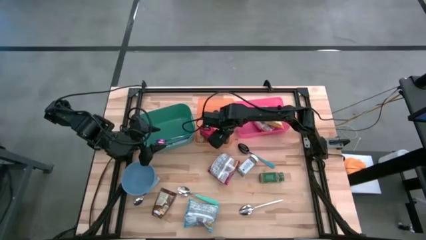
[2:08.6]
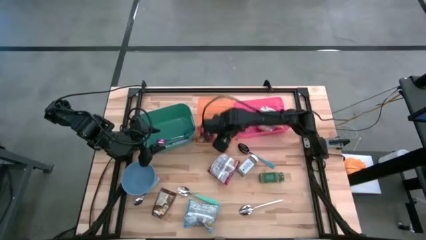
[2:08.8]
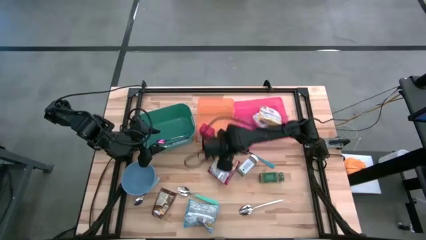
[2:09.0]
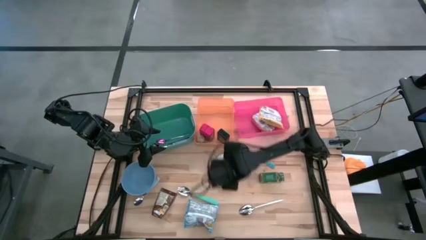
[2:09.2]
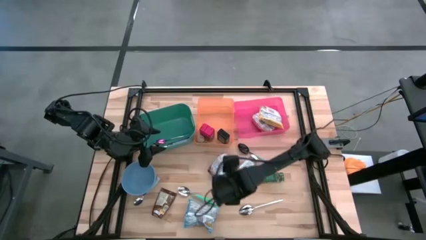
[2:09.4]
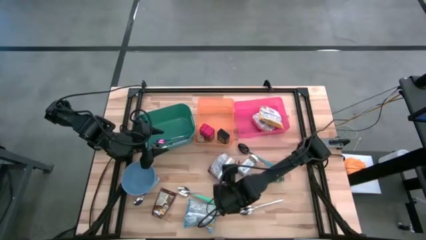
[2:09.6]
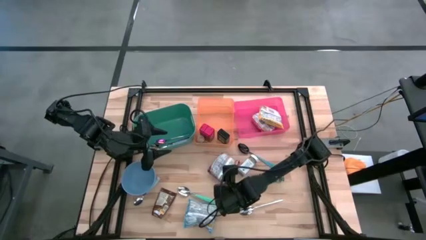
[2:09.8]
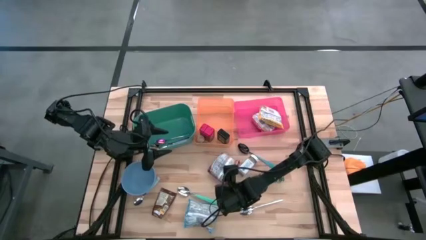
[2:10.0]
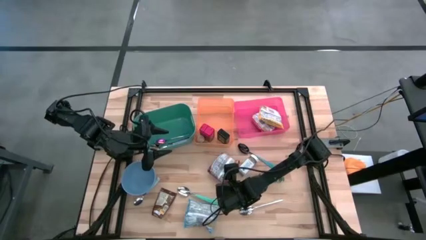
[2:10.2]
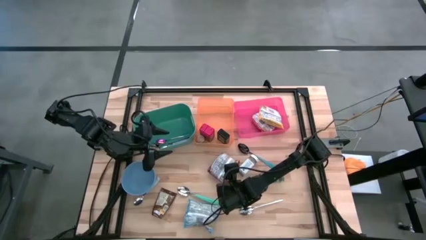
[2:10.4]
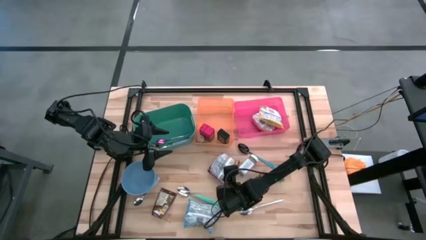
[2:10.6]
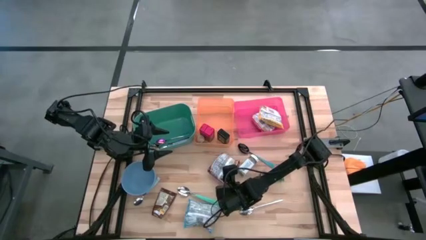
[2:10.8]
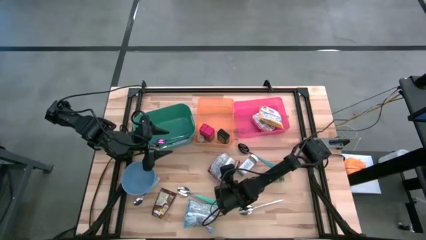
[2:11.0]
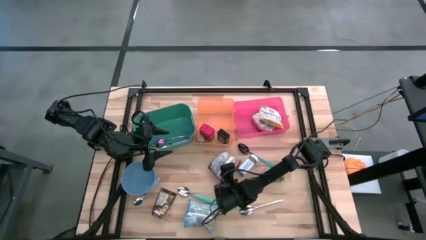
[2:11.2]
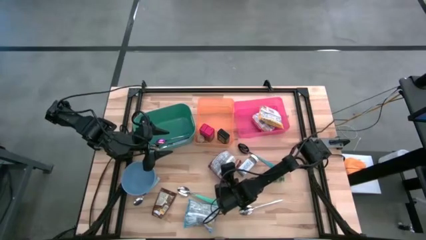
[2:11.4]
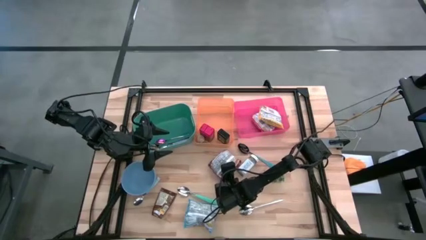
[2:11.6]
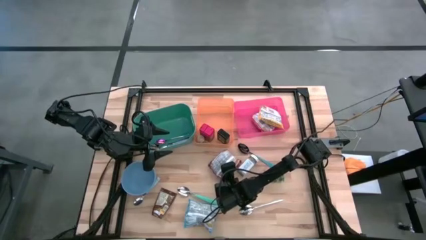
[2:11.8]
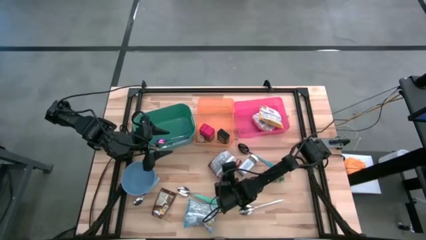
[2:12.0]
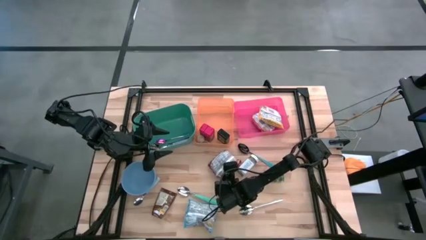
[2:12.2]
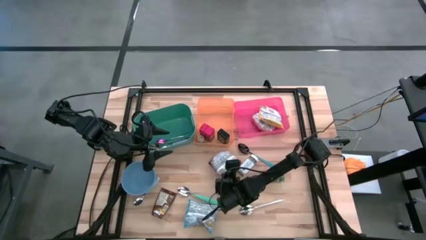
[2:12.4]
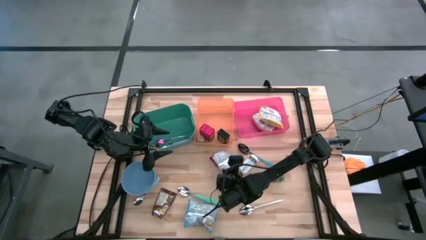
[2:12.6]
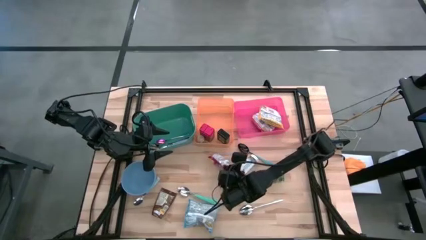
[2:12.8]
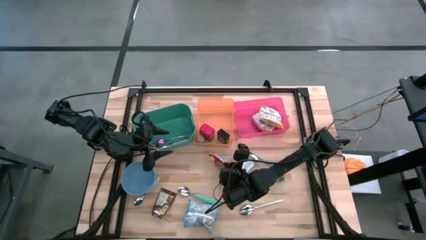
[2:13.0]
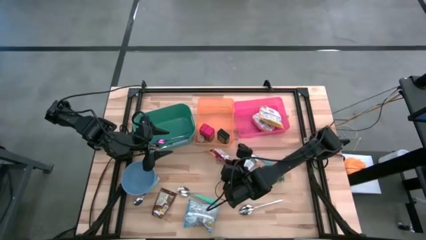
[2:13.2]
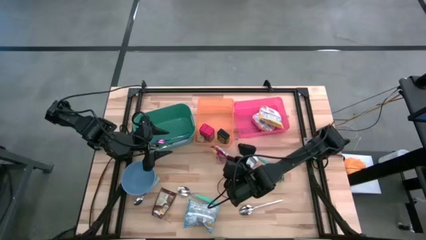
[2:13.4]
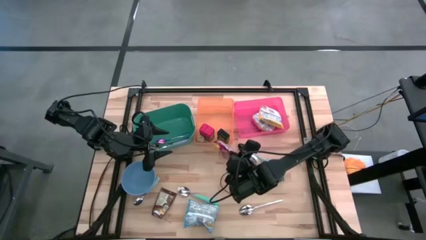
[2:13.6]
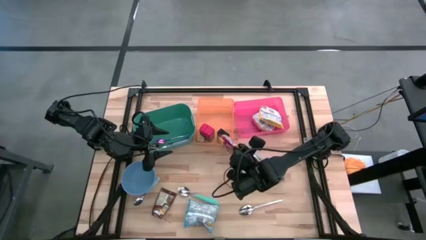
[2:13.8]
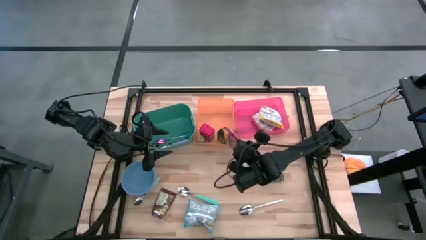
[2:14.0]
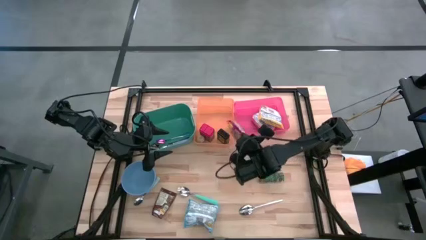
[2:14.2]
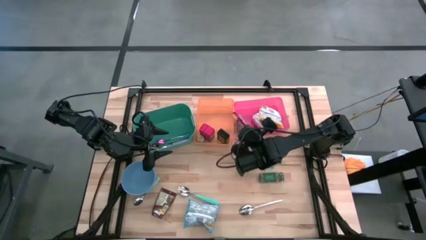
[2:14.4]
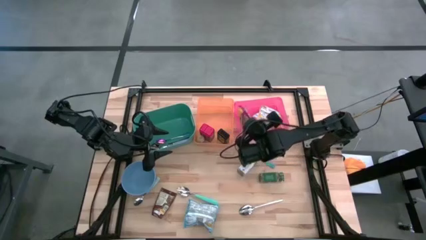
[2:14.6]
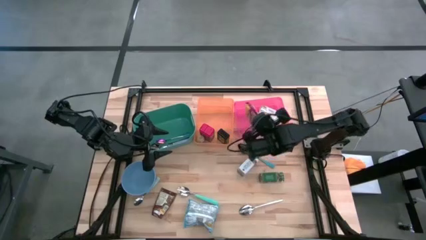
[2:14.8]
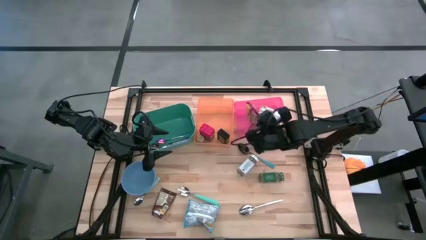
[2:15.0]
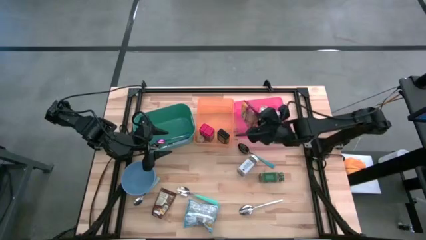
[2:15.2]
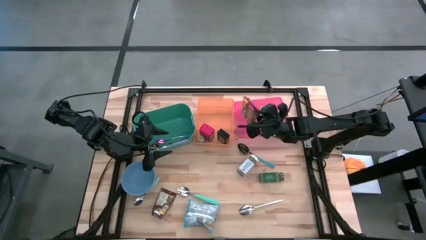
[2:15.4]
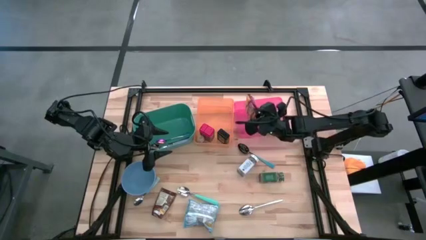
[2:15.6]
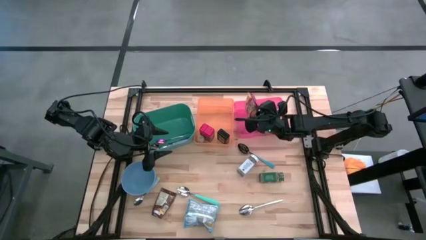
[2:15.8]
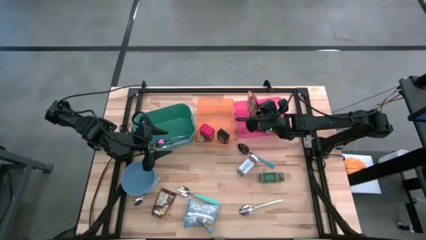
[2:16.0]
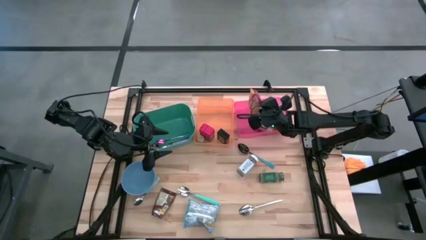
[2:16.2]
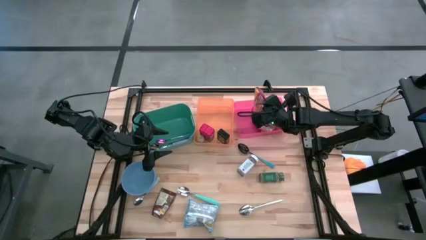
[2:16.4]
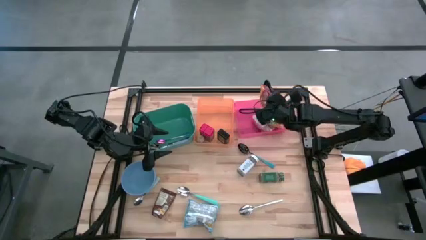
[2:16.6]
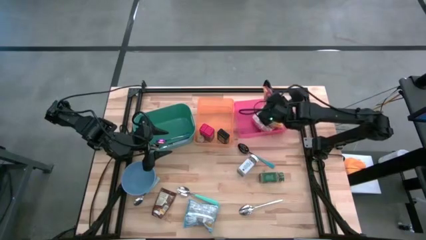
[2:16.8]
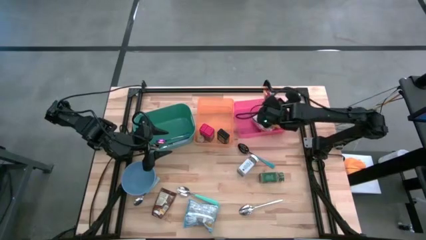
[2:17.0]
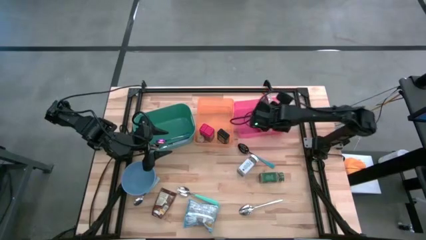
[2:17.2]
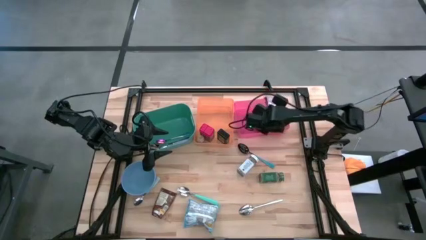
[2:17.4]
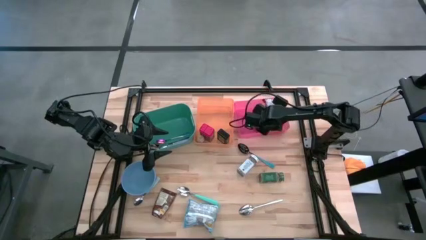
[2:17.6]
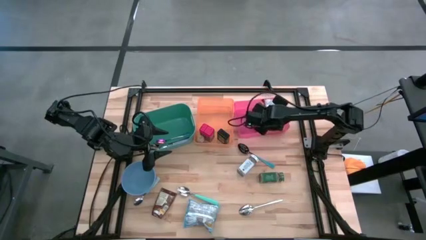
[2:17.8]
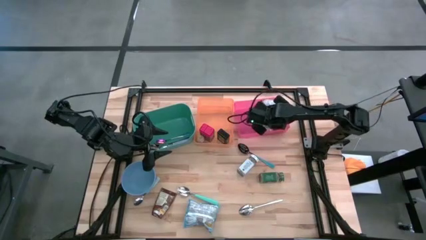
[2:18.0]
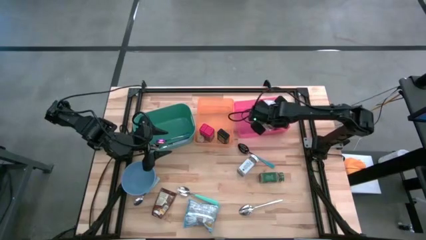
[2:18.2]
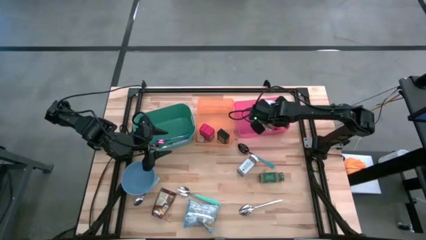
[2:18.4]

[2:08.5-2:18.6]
Put the red noodle pack into the pink bin

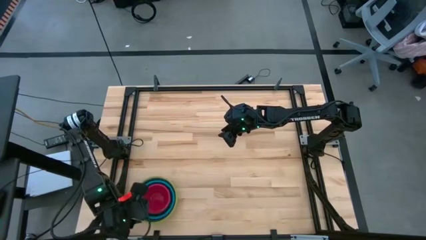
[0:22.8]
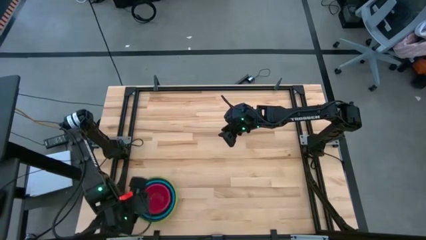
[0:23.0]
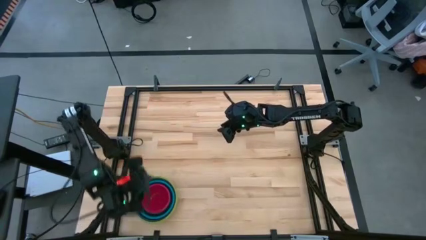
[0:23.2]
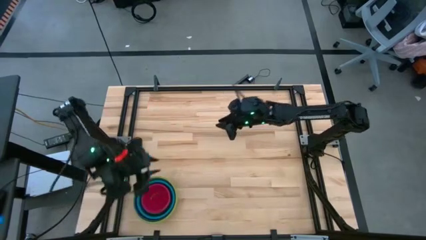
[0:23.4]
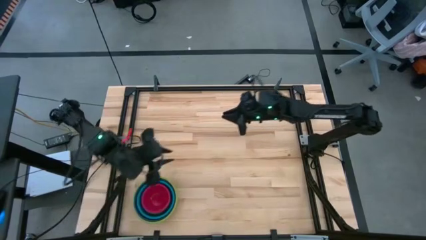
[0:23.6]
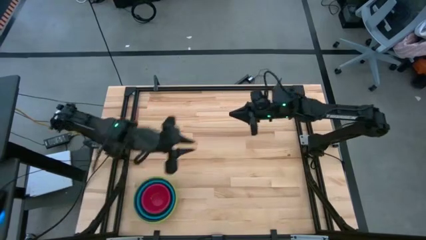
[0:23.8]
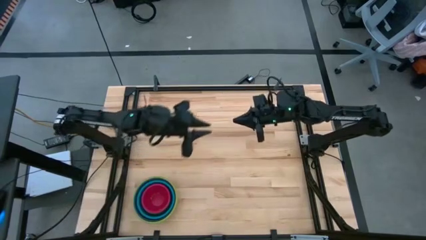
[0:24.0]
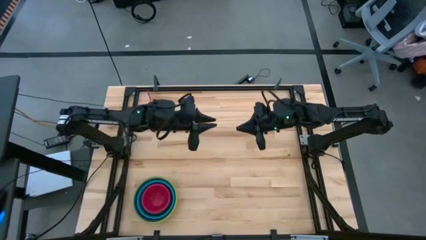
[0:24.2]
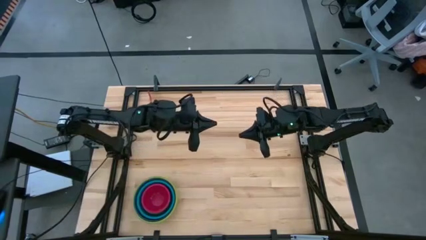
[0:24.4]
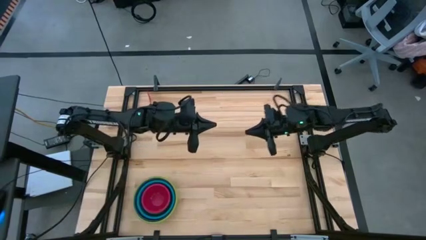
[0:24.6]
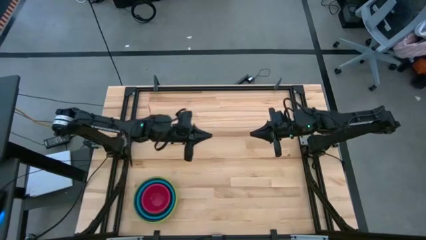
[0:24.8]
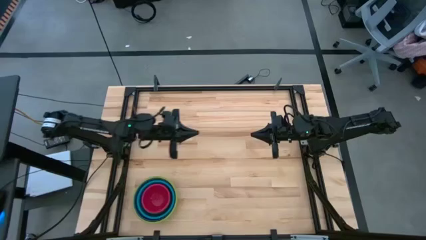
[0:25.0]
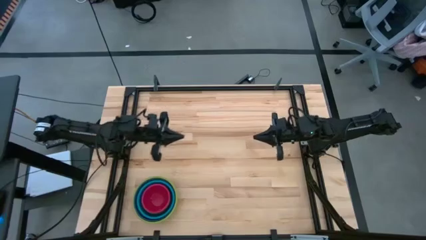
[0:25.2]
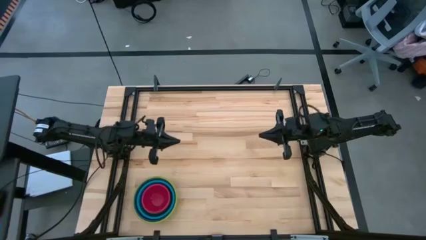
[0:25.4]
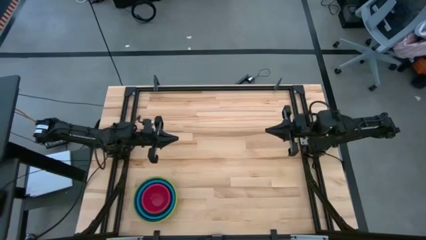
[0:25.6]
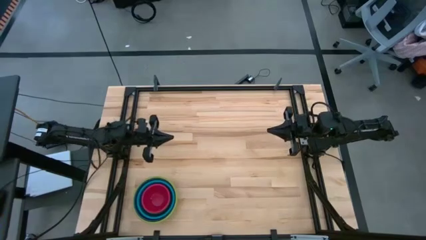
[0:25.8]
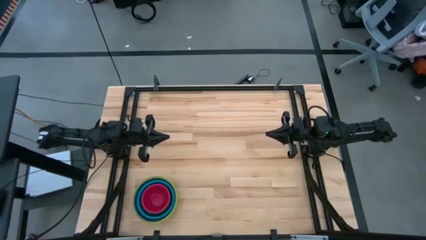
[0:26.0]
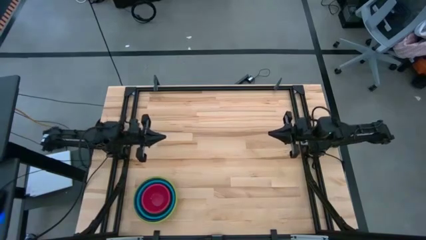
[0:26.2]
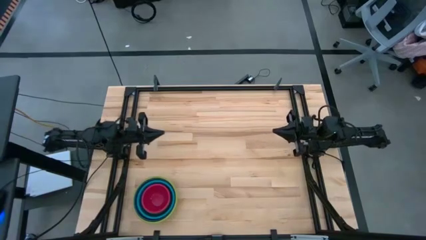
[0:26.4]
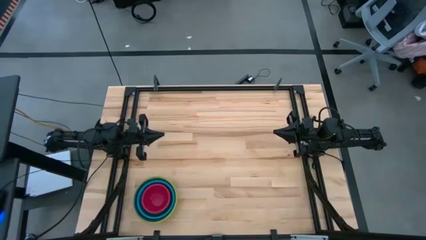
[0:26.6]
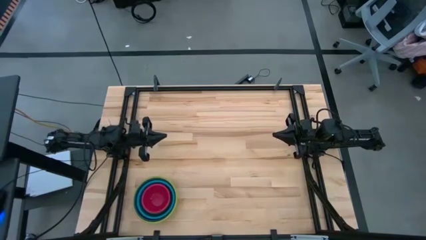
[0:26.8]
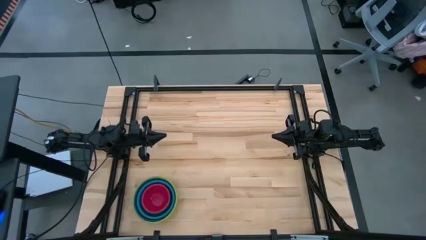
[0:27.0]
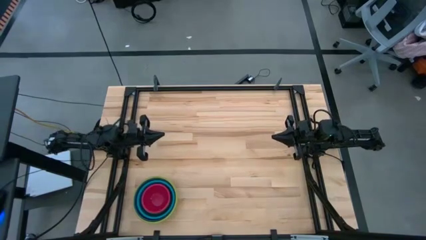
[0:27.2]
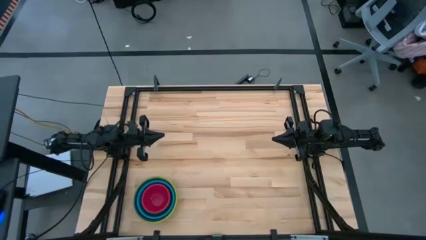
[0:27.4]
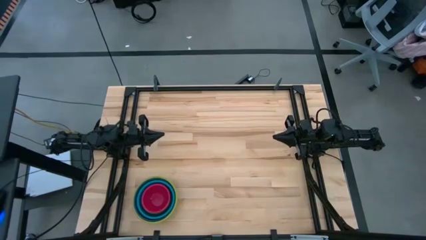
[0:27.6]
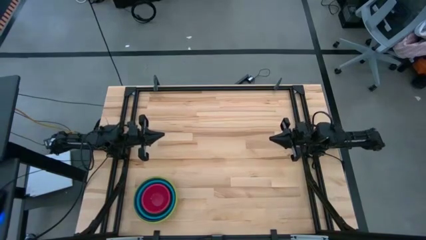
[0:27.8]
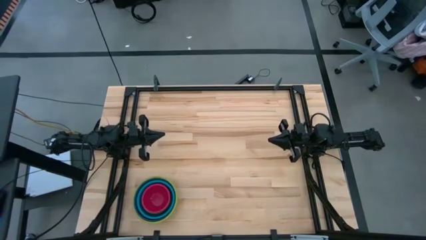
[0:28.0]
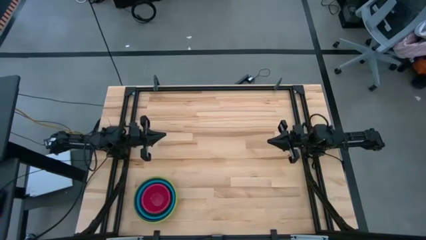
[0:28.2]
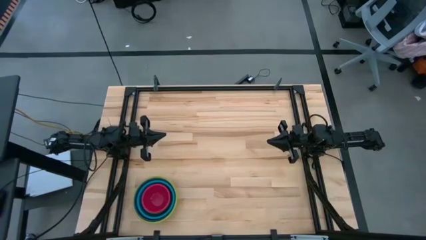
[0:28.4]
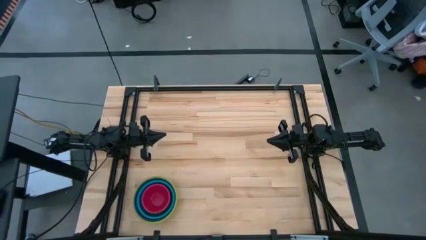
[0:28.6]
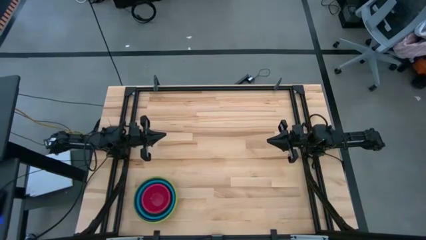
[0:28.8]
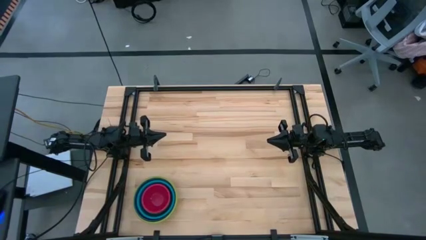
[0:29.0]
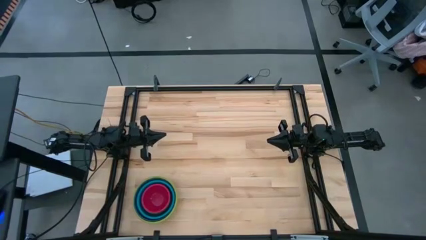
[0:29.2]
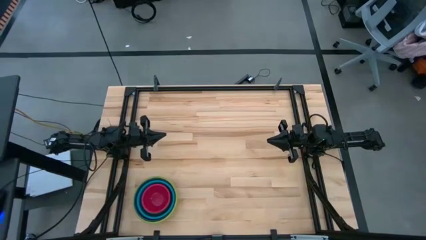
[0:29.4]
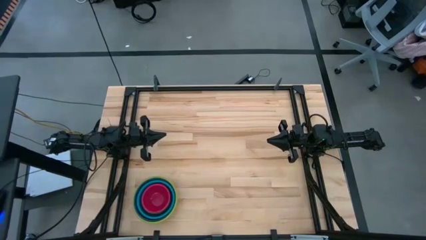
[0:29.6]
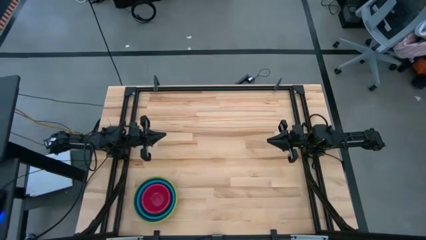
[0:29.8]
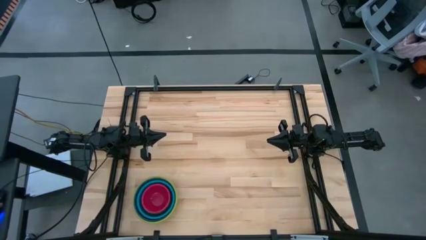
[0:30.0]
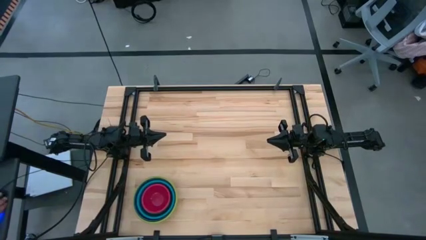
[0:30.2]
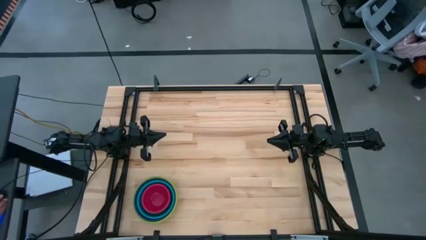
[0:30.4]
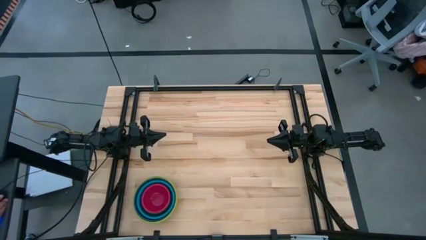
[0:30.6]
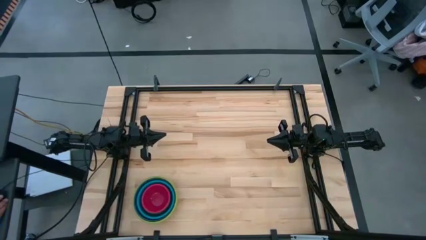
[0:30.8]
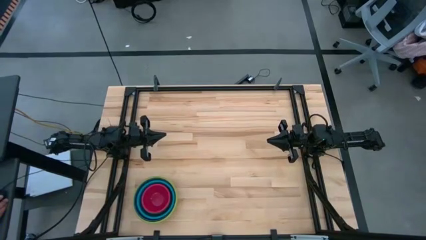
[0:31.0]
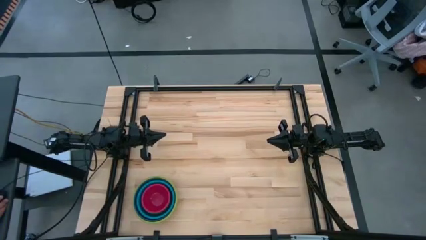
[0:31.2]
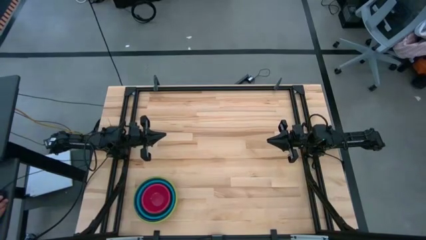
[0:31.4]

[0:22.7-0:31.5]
Return to Home Position
